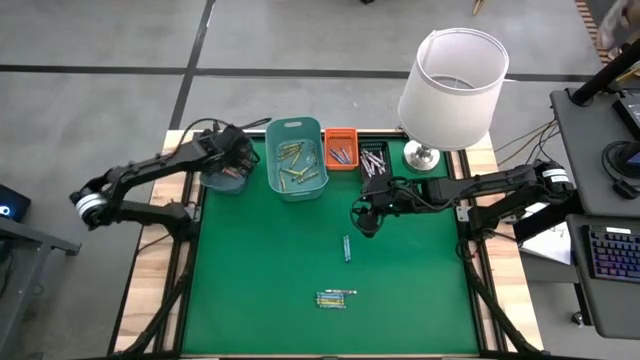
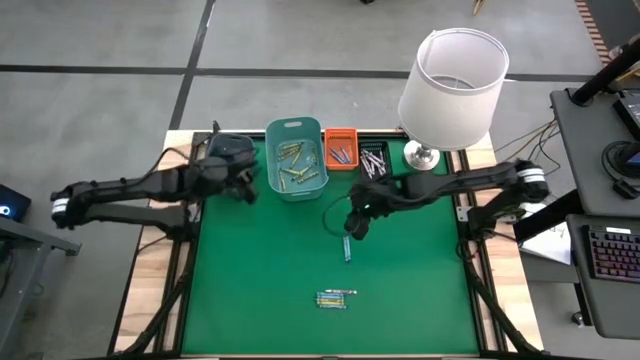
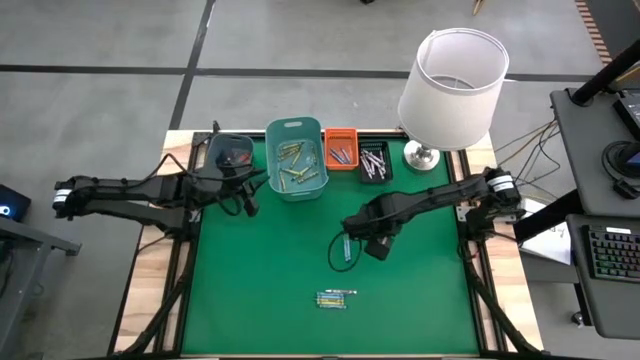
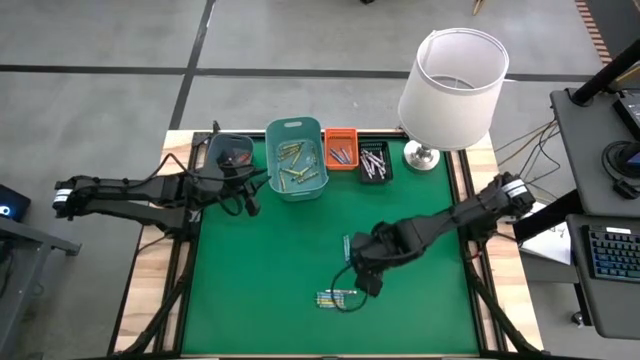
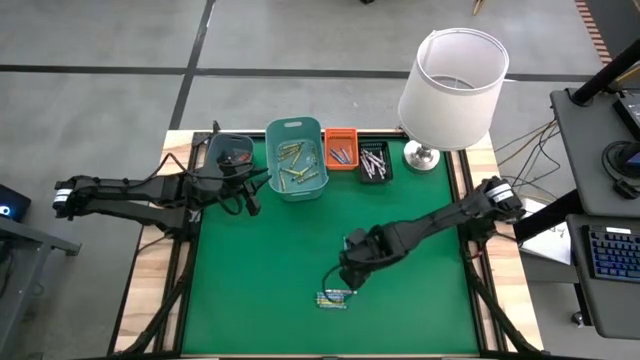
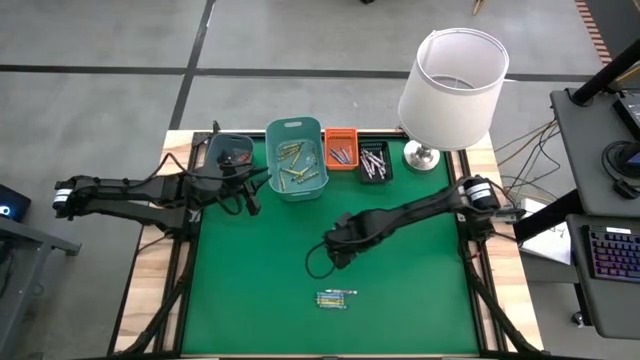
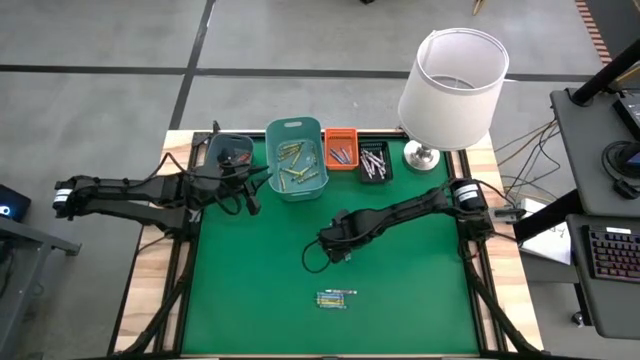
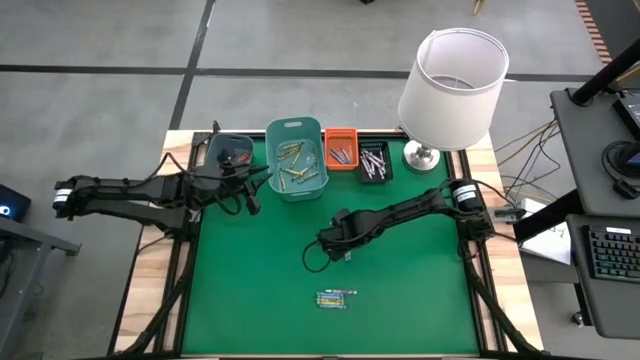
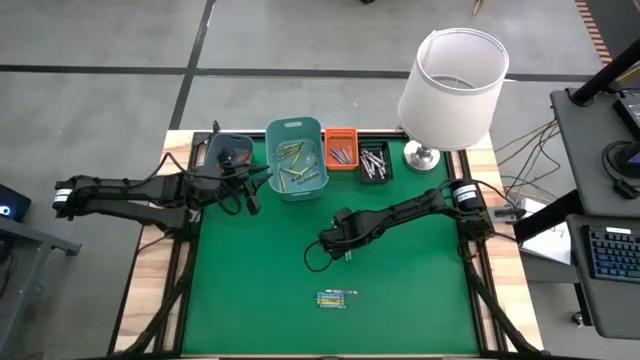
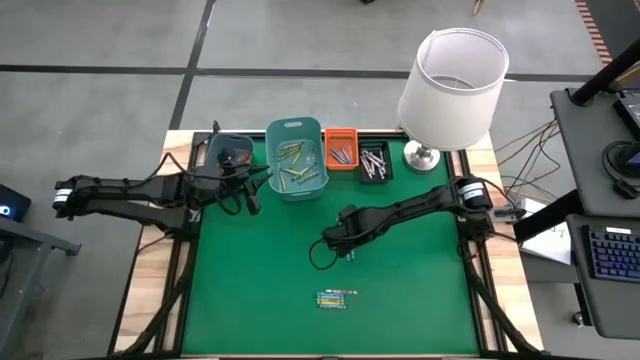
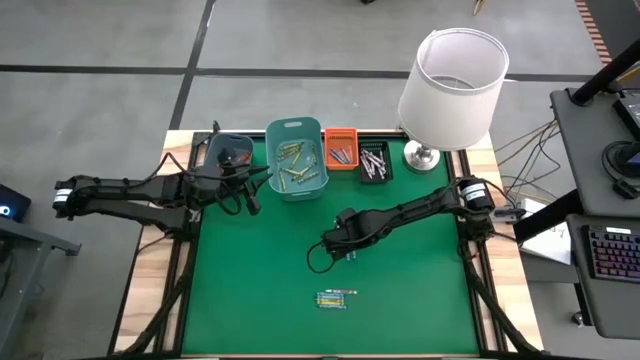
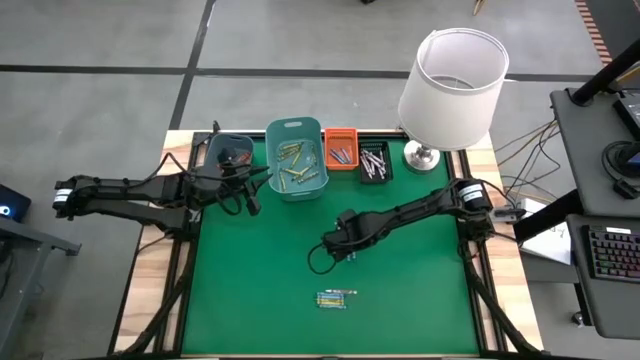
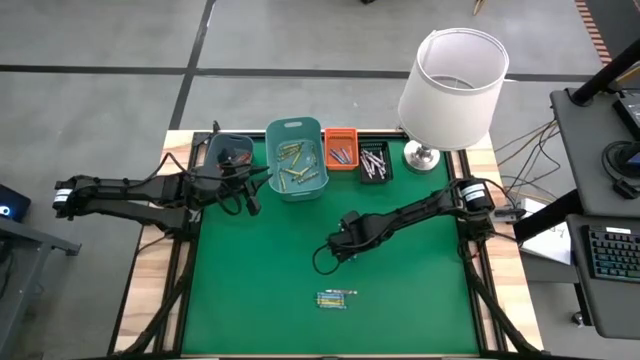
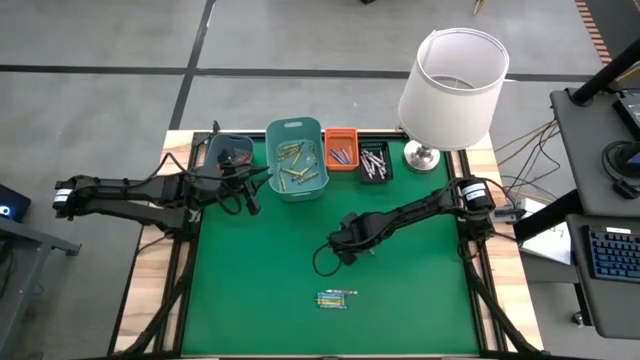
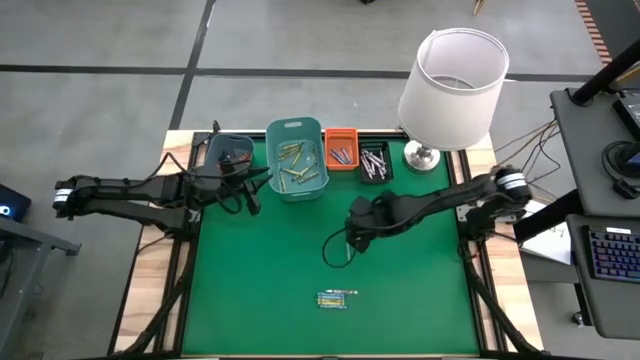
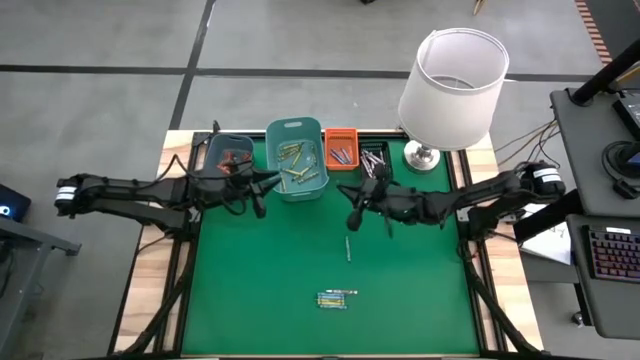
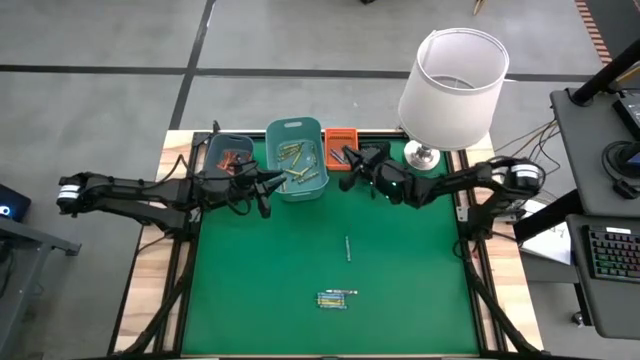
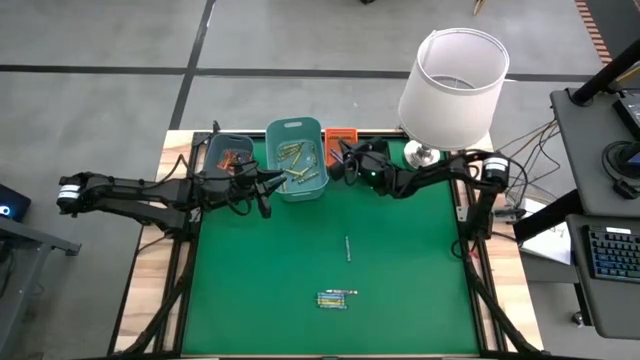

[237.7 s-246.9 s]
Task: Sort crayons
Put the blue crayon into the orange bin

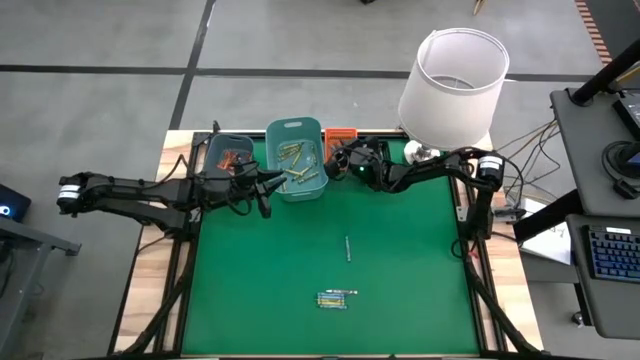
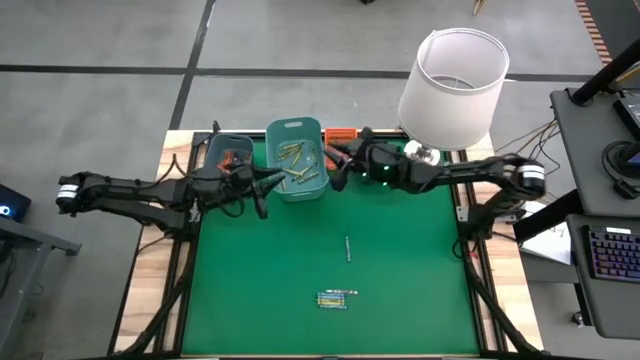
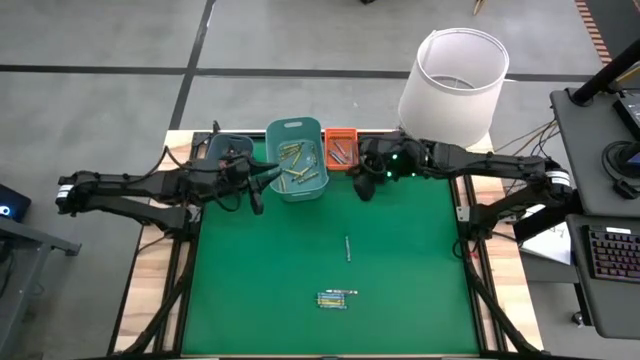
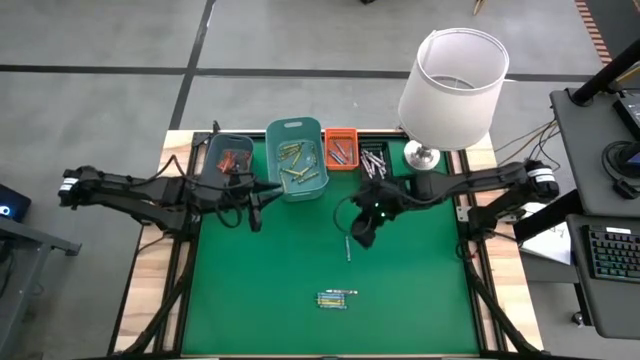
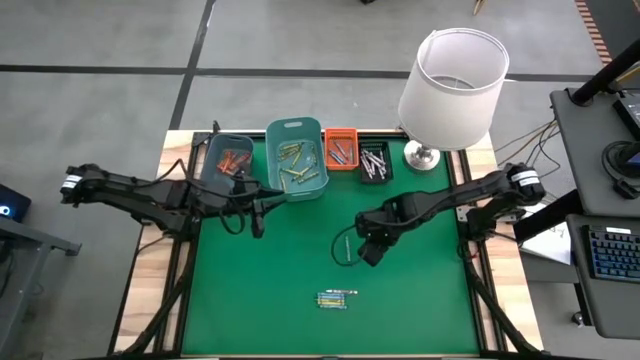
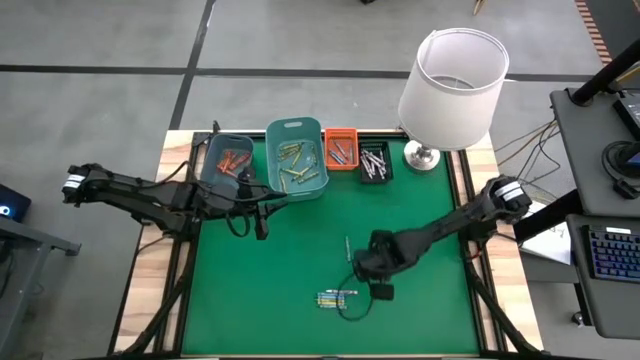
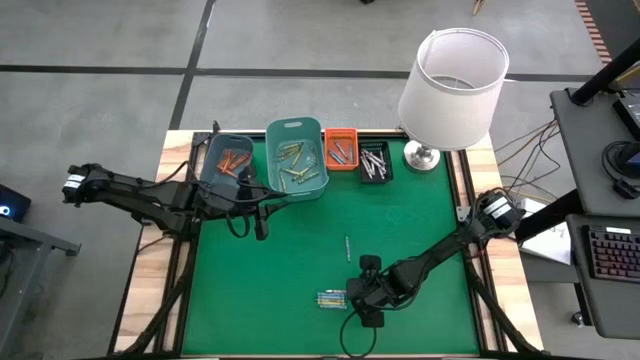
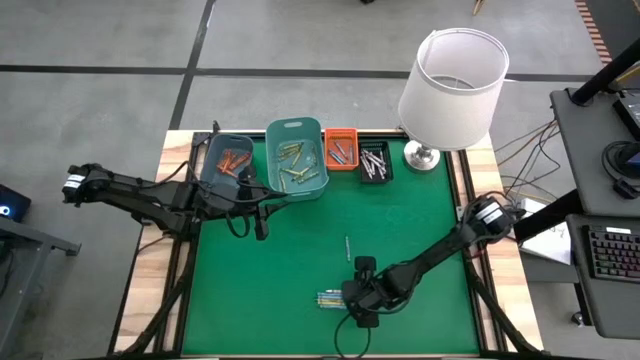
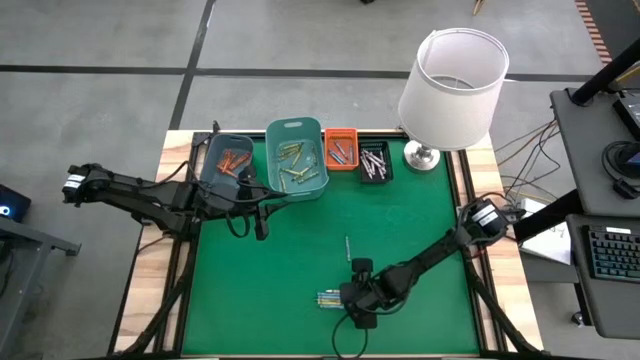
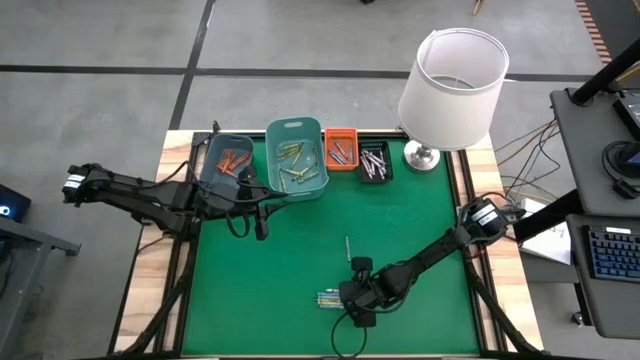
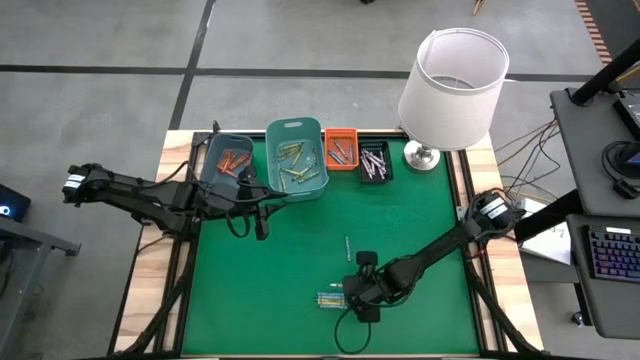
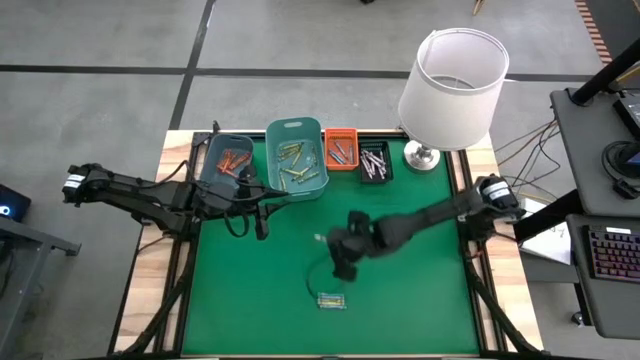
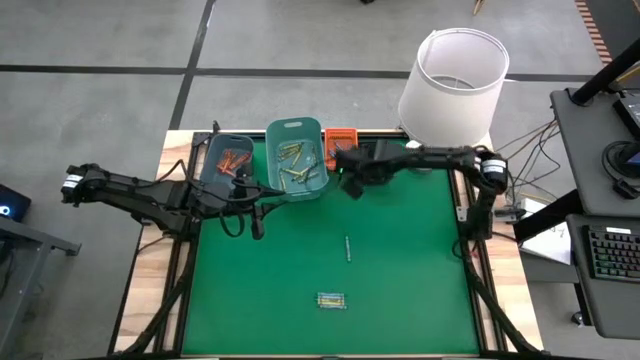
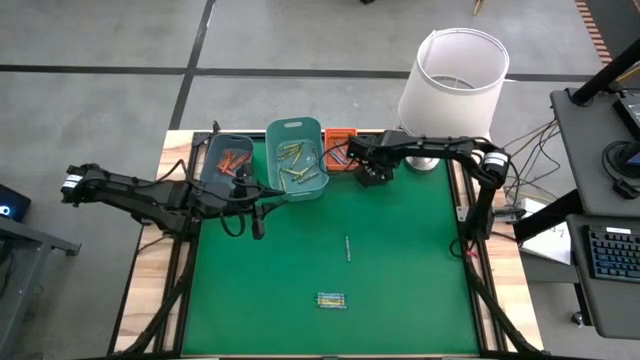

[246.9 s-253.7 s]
Put the white crayon into the black bin

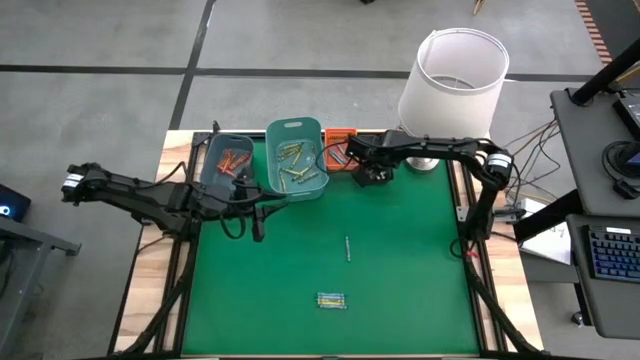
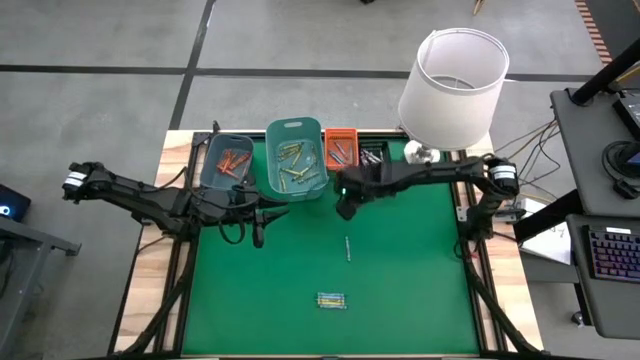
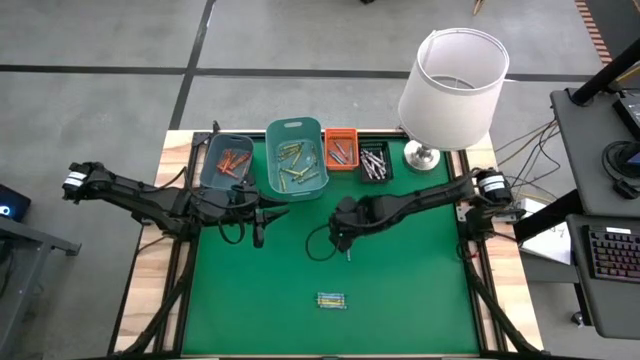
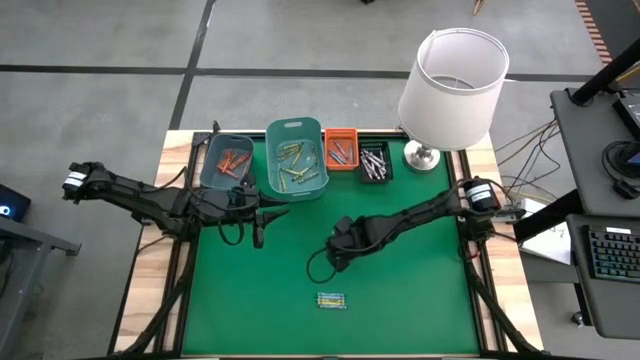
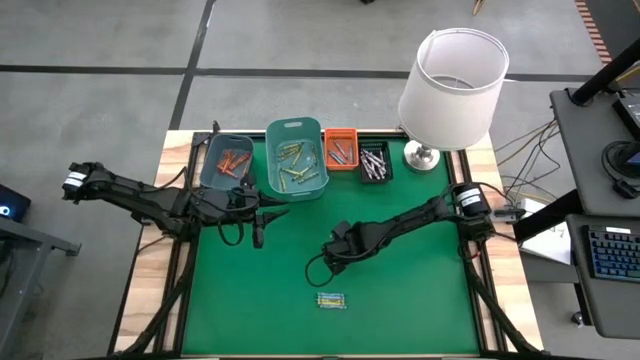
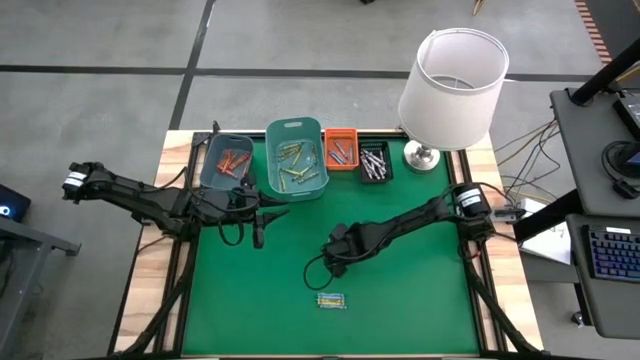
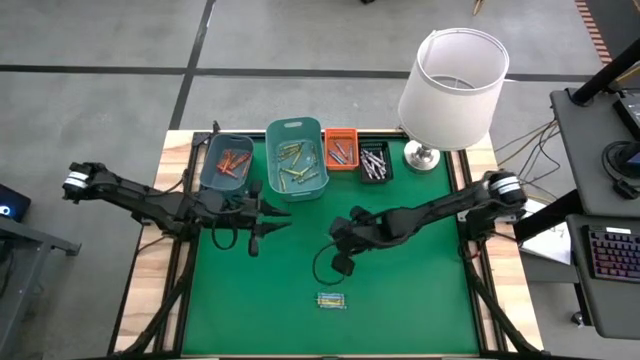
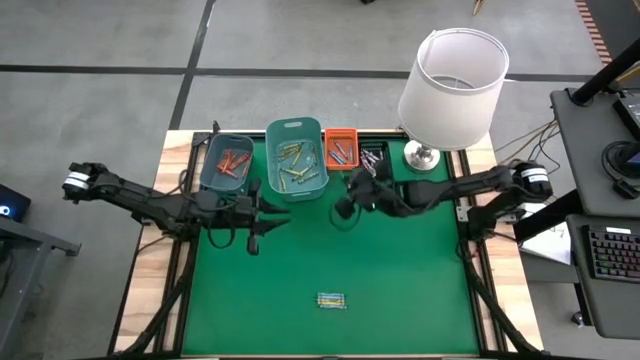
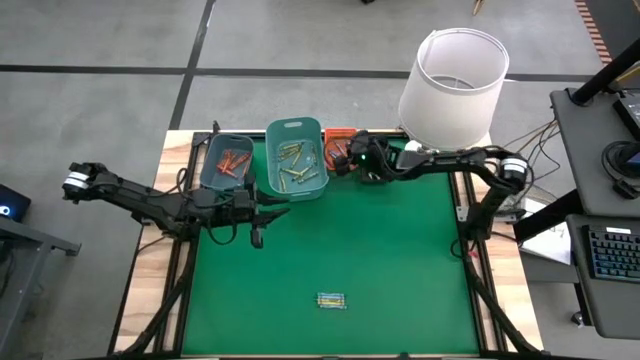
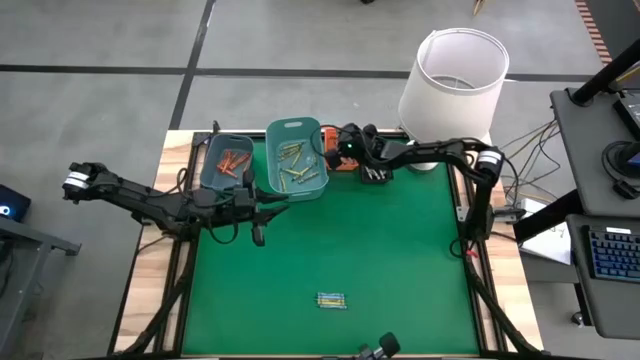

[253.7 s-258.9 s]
Put the blue crayon into the orange bin
